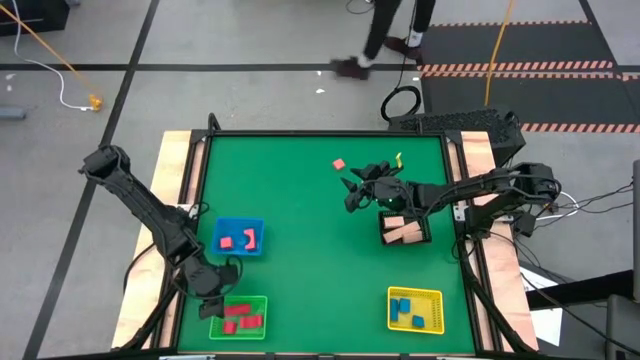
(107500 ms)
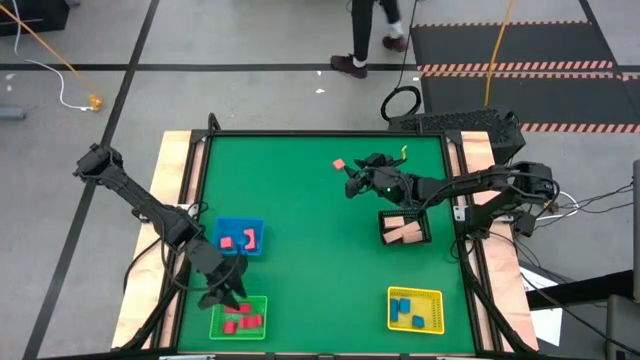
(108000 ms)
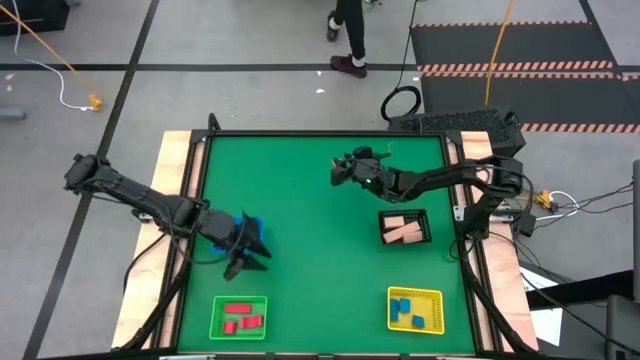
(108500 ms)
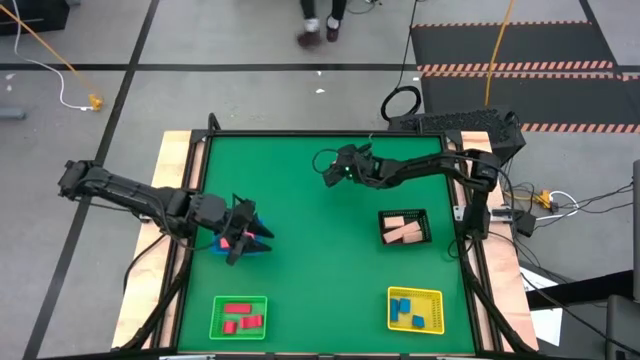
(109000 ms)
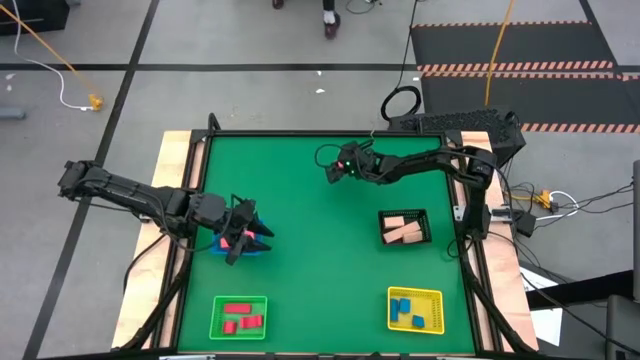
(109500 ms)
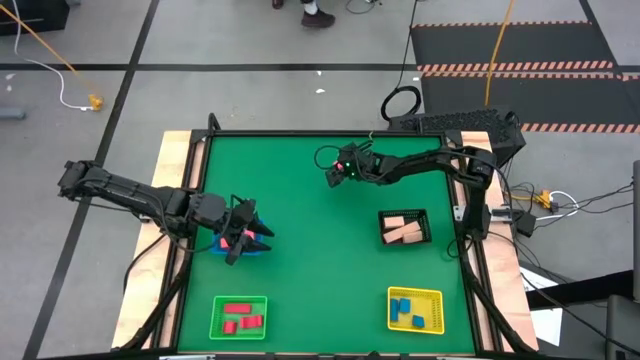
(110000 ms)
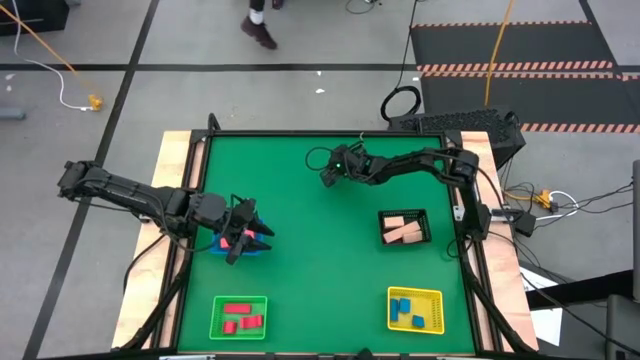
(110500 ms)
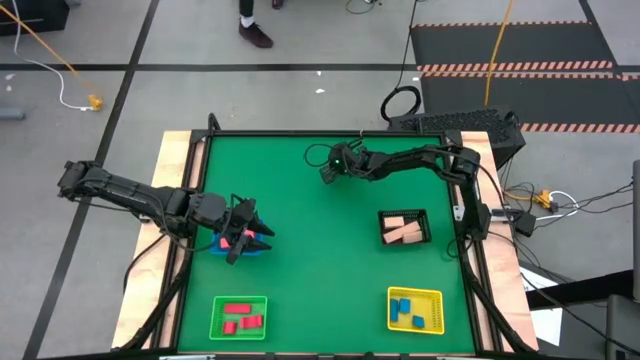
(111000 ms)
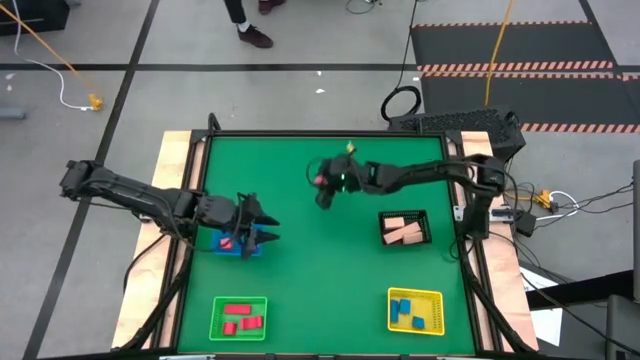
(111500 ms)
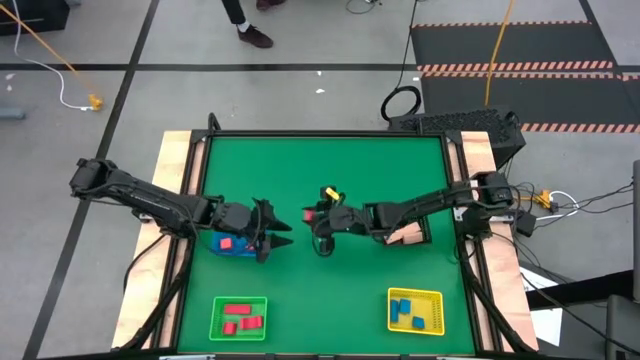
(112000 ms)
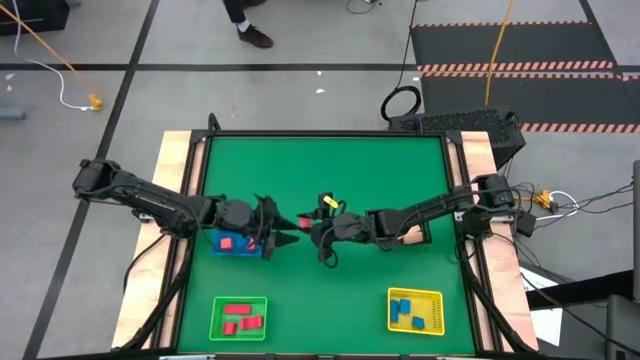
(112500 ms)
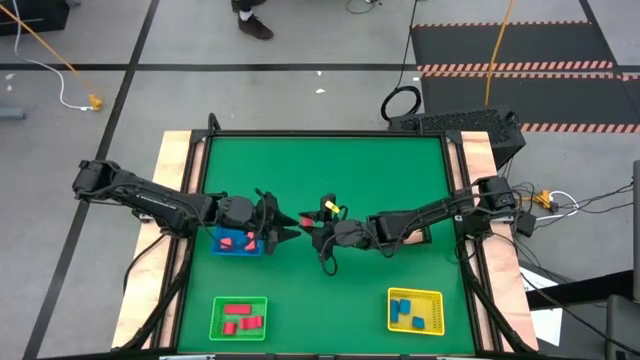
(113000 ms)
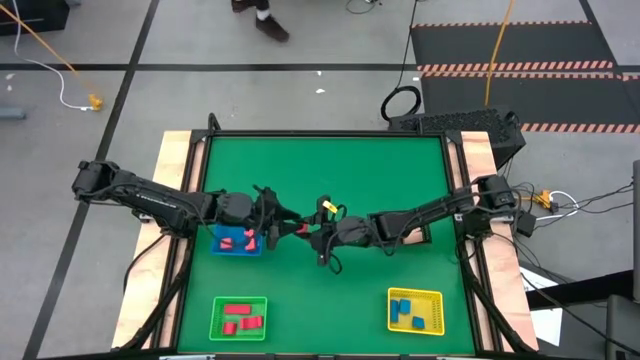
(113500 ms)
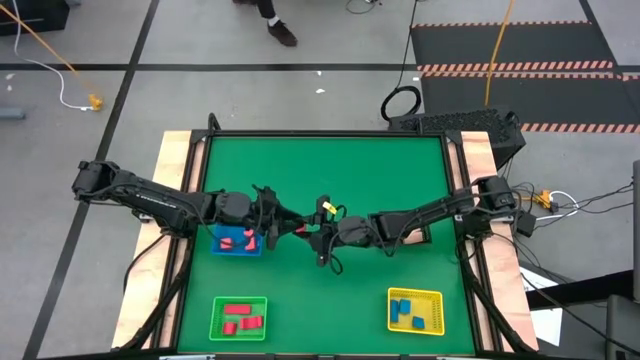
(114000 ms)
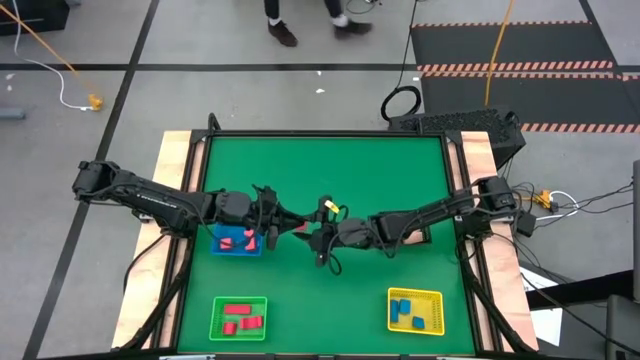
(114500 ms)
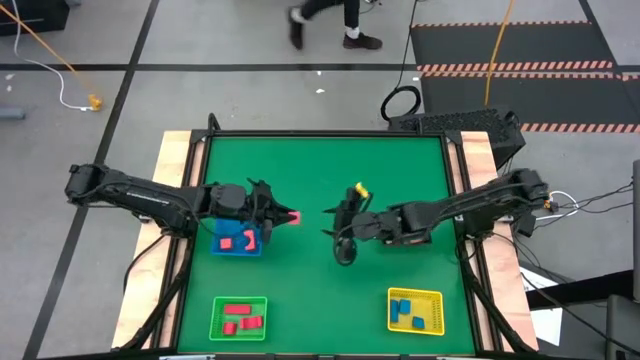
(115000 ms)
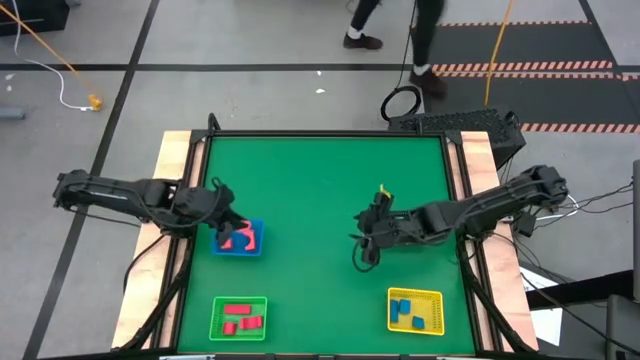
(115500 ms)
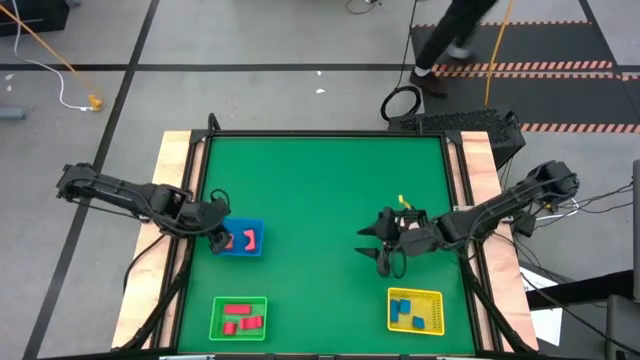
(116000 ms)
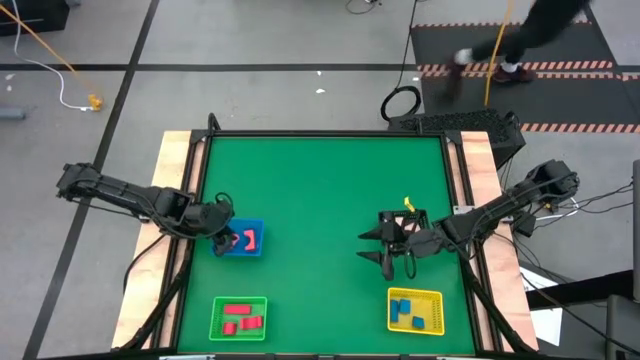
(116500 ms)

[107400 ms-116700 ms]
Task: Sort & place blocks by color
Put the orange block into the blue bin

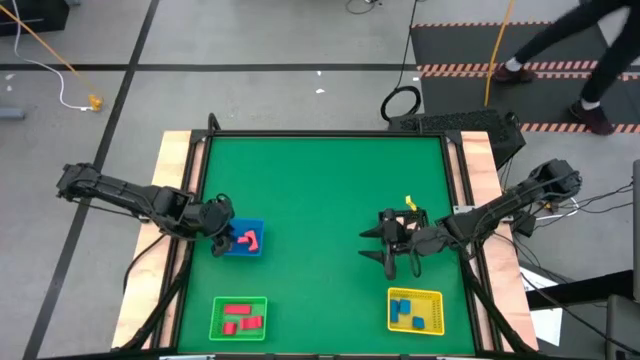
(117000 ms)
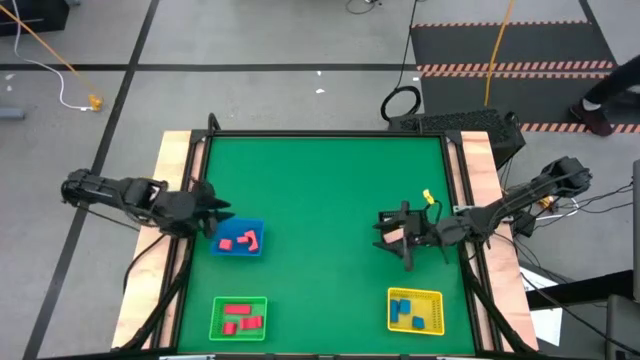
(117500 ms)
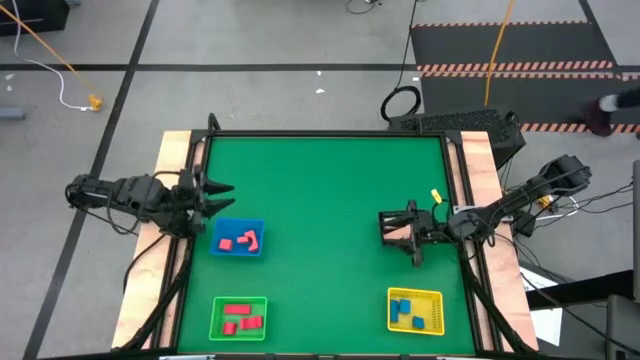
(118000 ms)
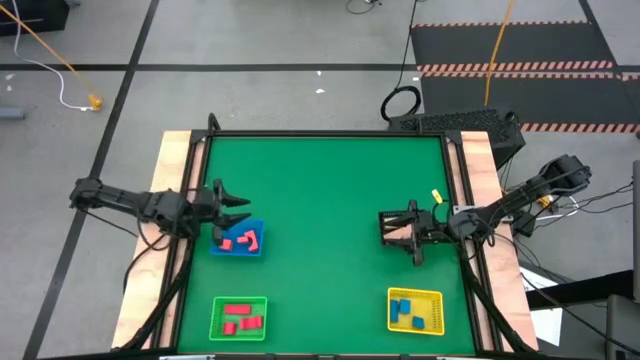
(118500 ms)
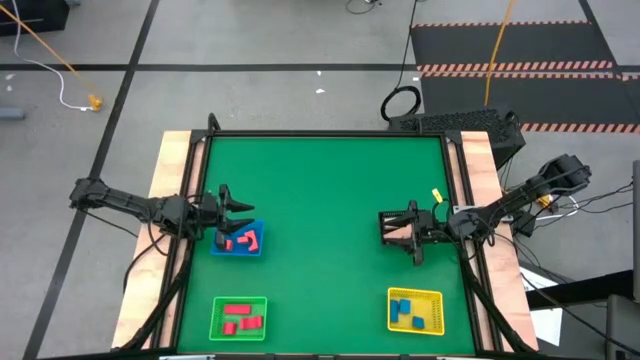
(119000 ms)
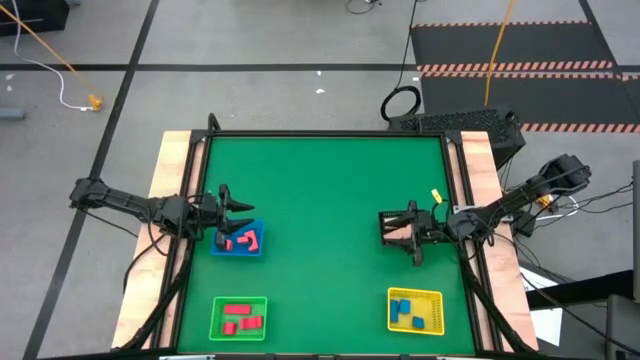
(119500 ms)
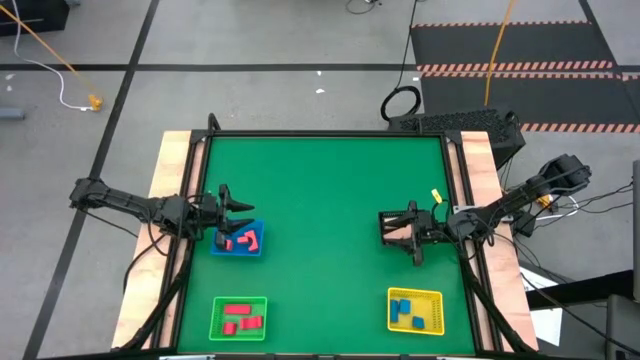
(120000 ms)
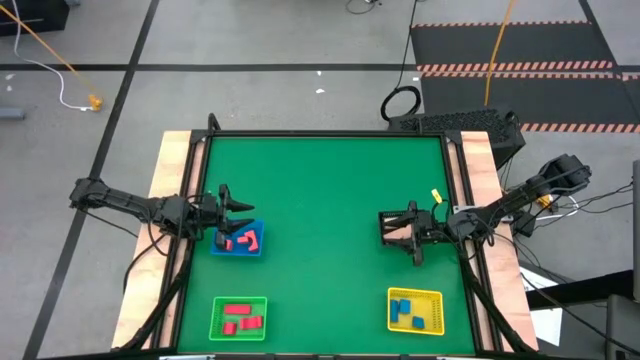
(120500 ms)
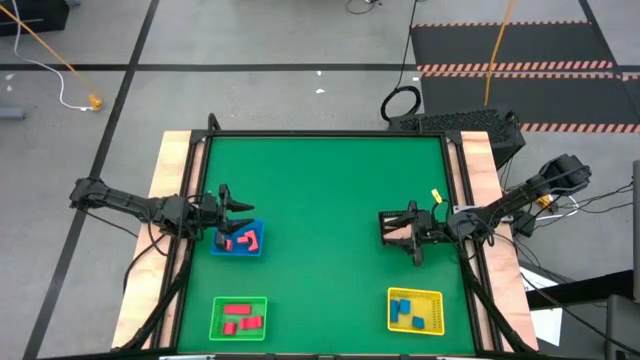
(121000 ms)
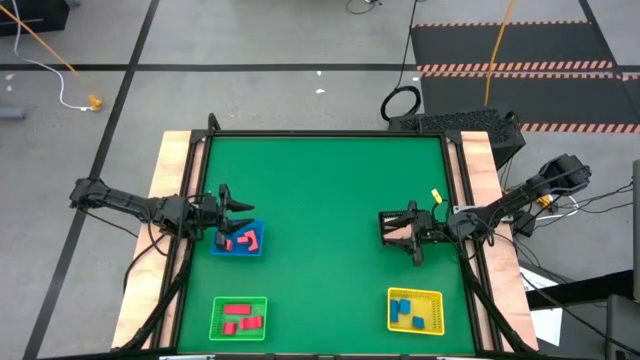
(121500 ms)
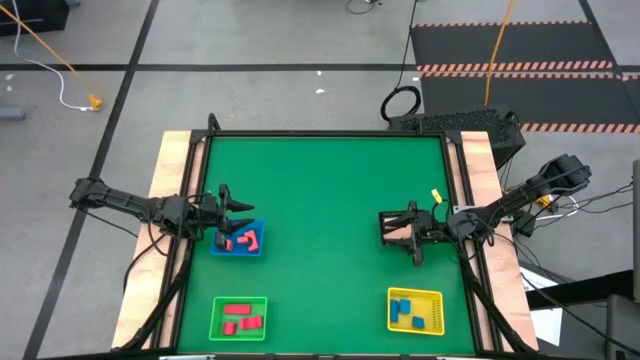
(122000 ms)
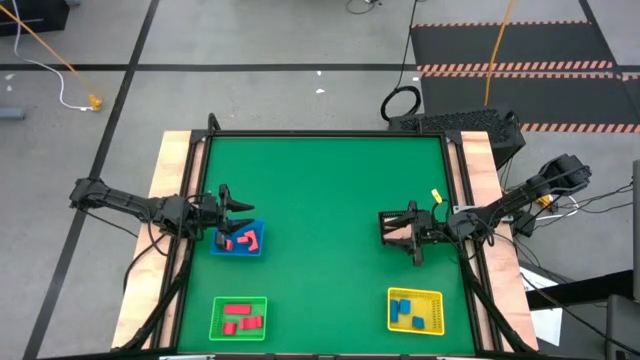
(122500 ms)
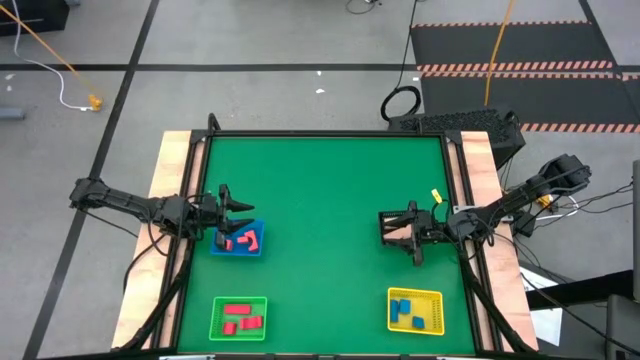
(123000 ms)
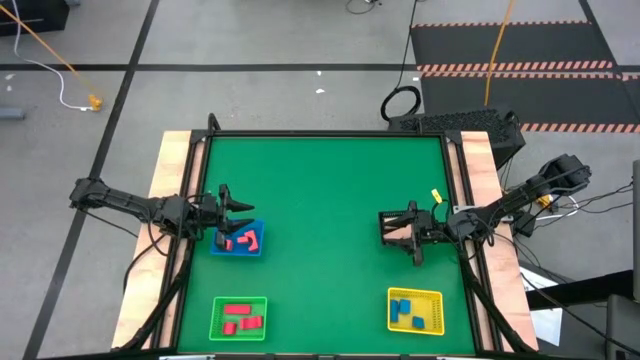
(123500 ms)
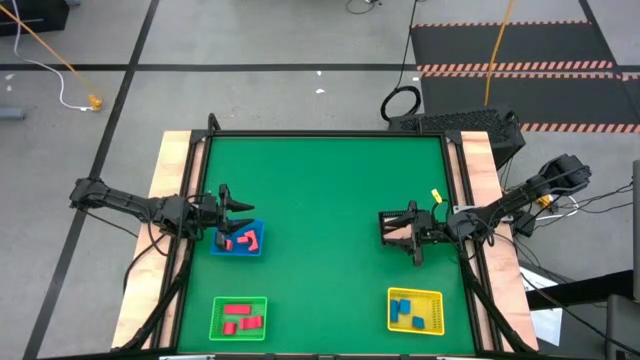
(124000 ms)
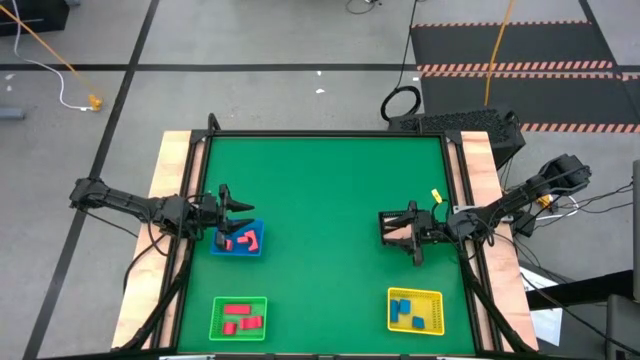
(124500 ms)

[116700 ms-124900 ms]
Return to Home Position

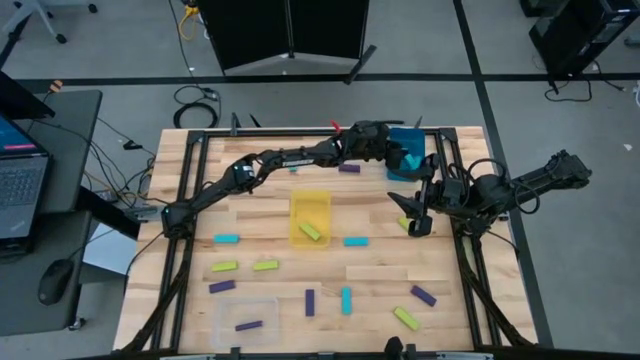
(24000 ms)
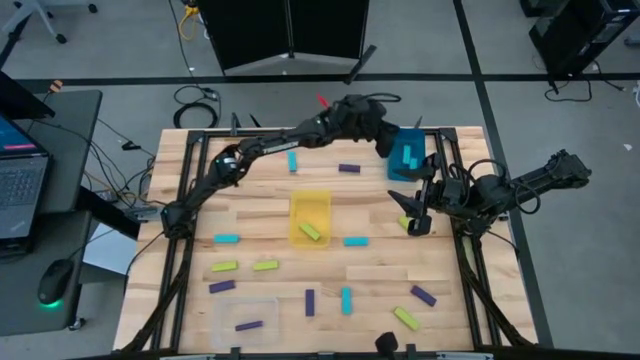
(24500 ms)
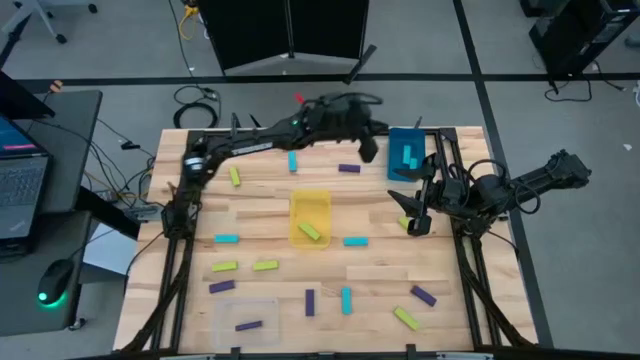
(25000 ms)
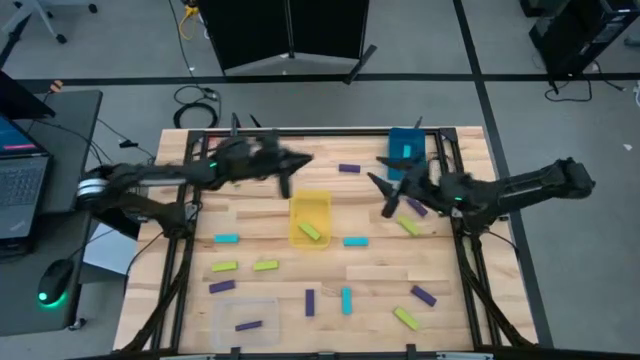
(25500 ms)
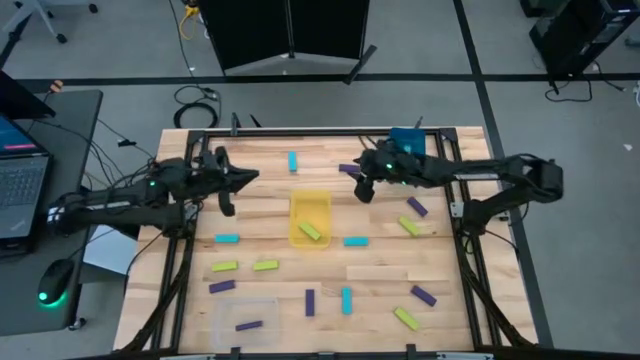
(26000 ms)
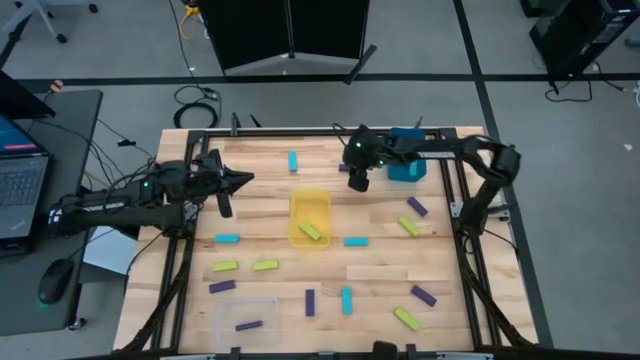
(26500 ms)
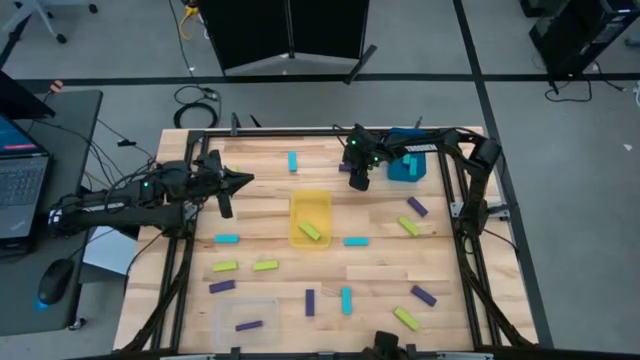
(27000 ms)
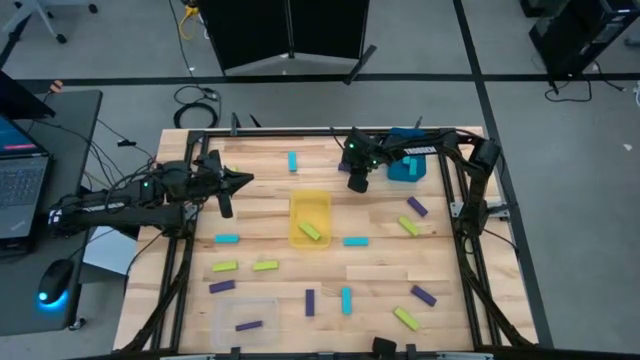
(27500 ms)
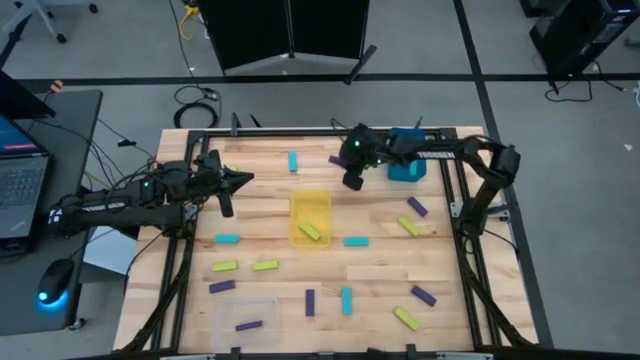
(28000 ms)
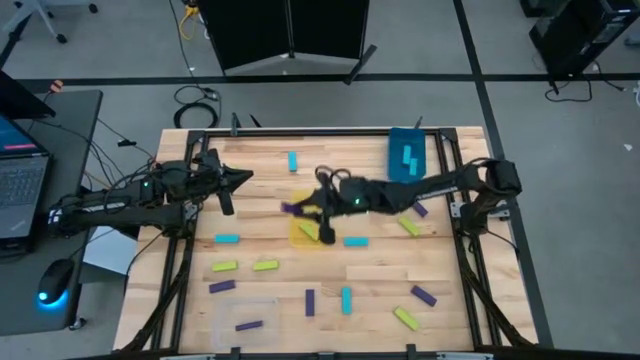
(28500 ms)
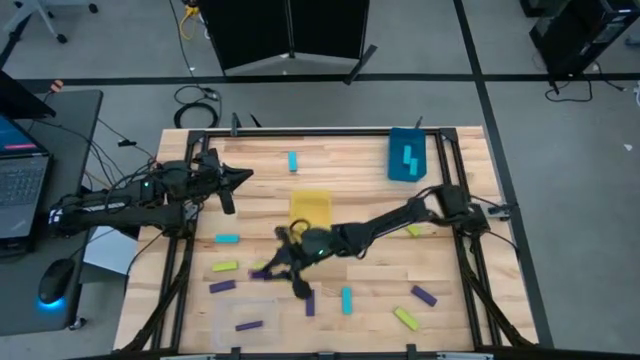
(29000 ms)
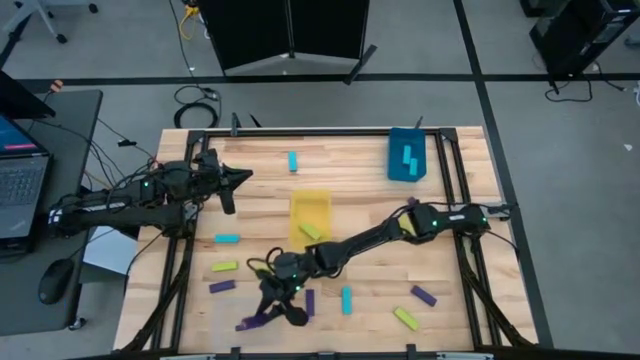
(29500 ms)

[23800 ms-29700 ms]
Task: Sort blocks
Put the purple block into the transparent bin
